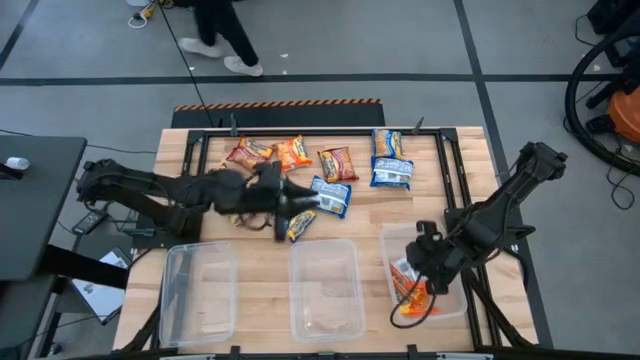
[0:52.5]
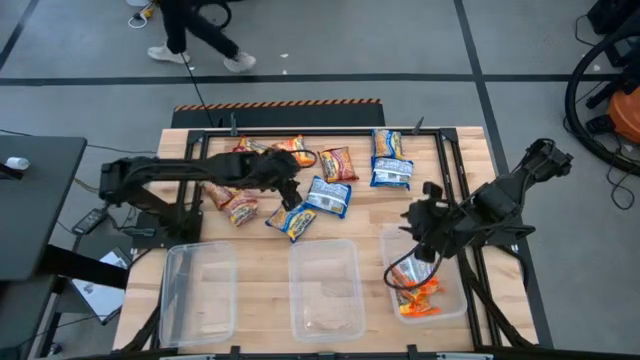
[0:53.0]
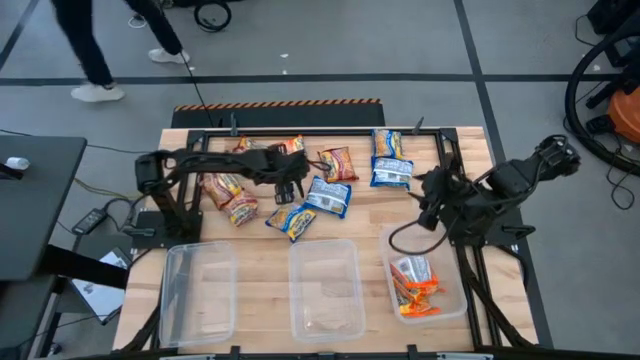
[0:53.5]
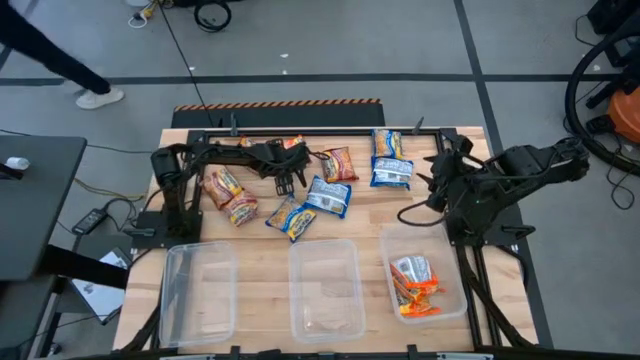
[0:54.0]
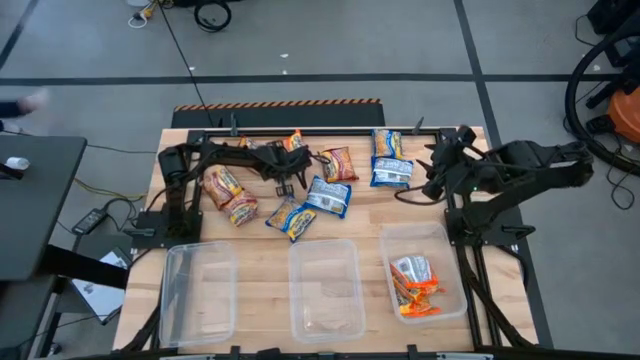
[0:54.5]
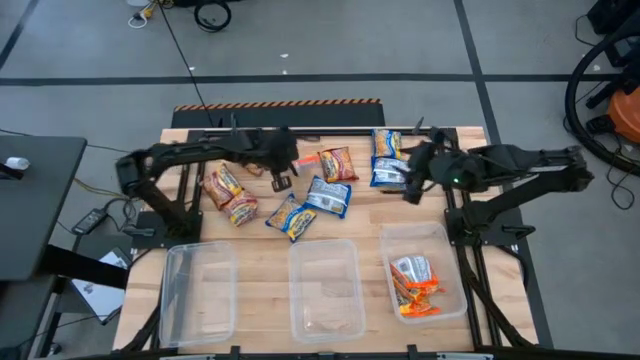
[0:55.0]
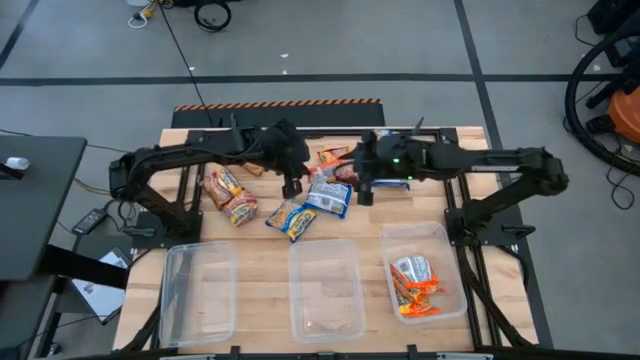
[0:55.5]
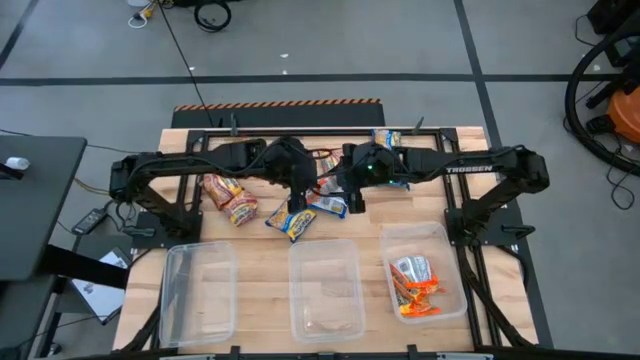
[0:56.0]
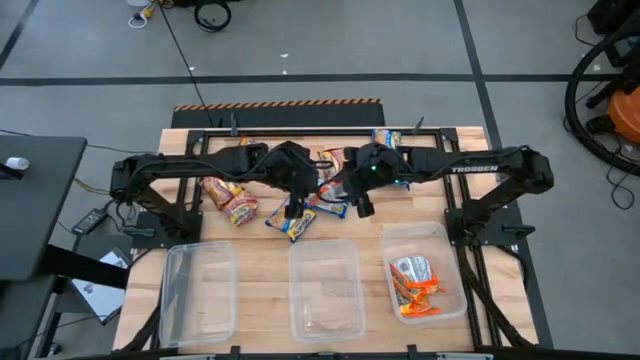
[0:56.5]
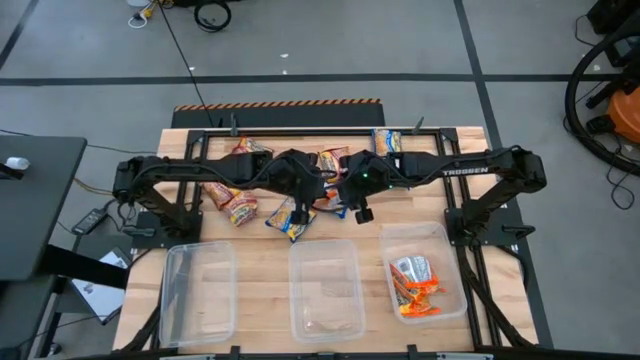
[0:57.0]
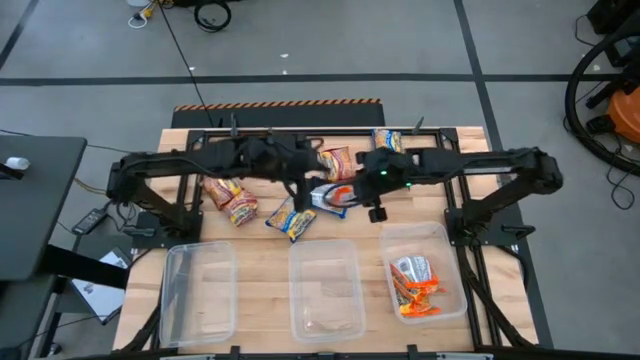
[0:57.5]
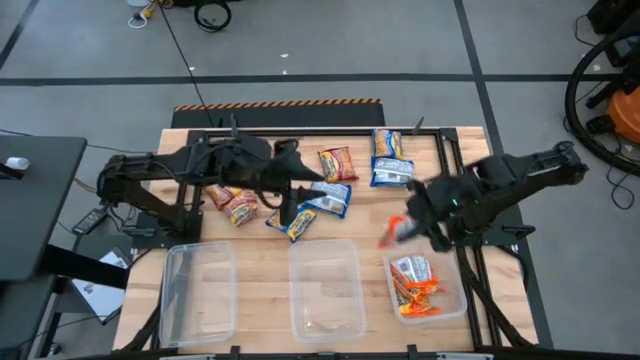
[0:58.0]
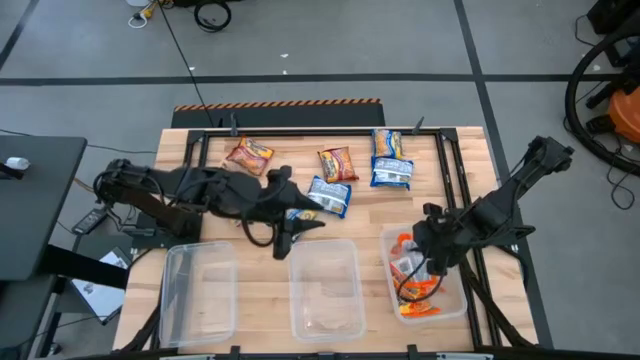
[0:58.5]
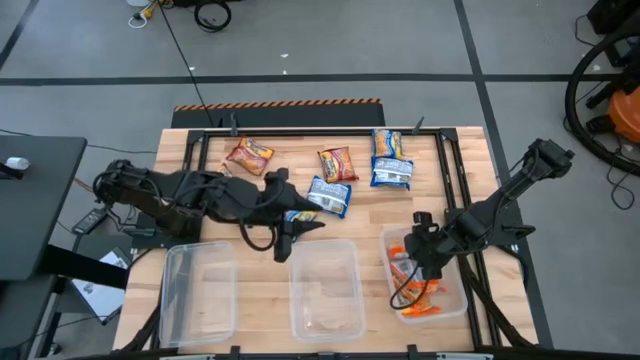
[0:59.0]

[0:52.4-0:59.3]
Task: Sort Maruchan noodles
Put the orange noodle pack on the right transparent bin

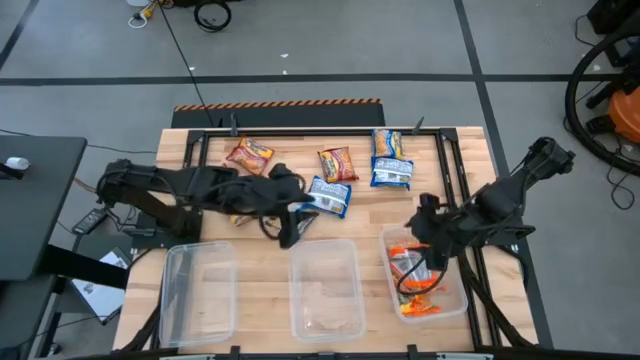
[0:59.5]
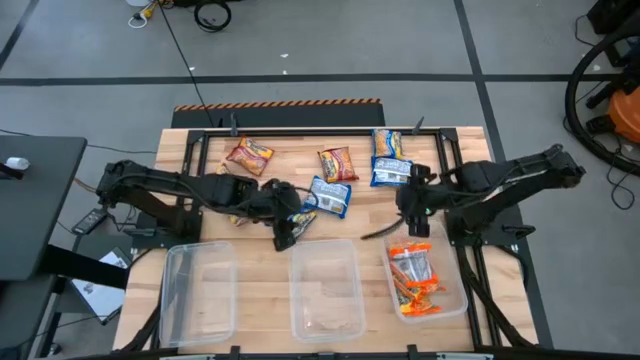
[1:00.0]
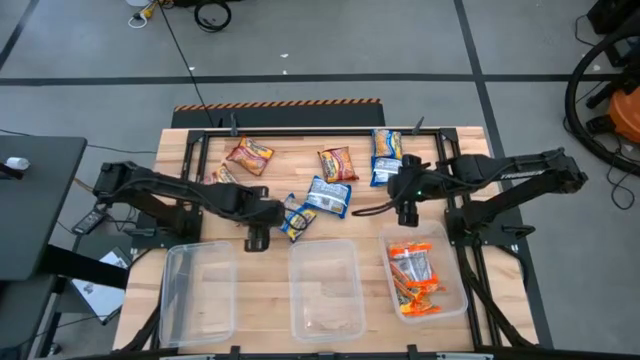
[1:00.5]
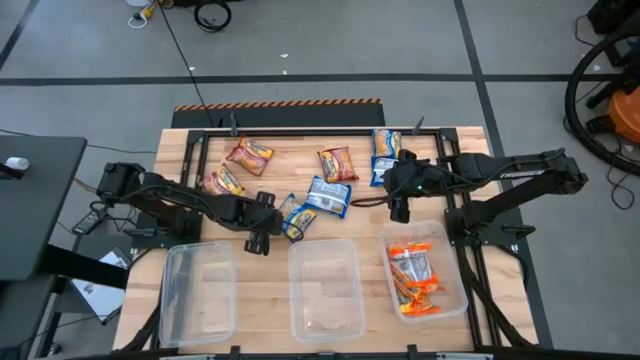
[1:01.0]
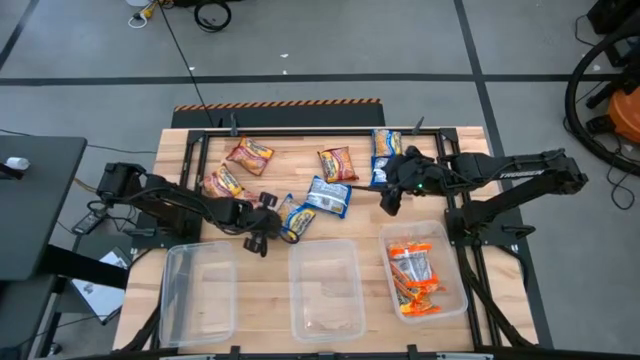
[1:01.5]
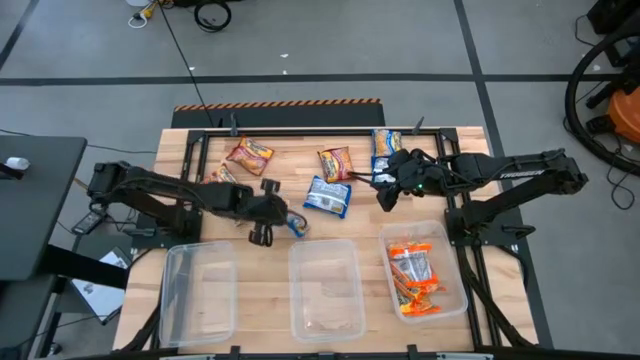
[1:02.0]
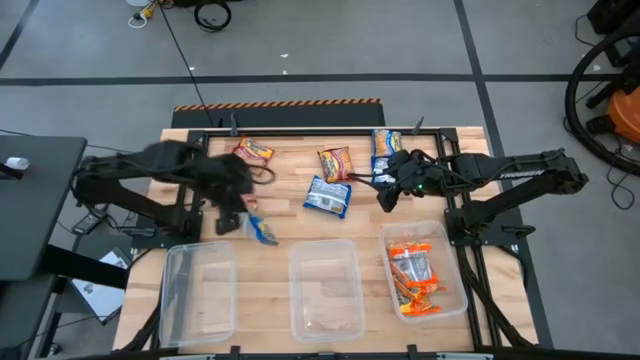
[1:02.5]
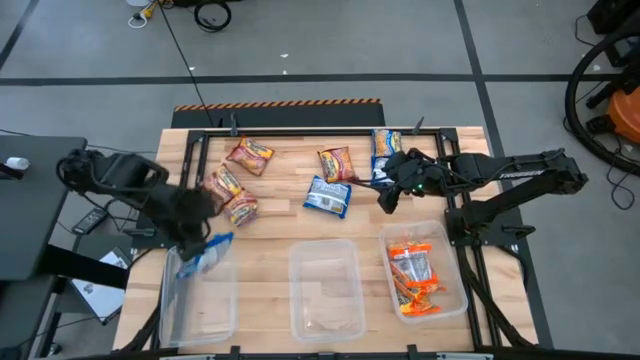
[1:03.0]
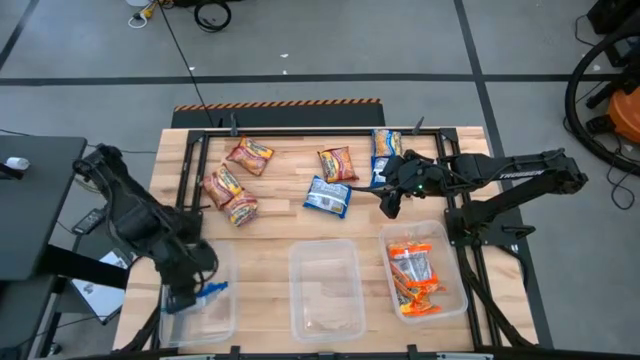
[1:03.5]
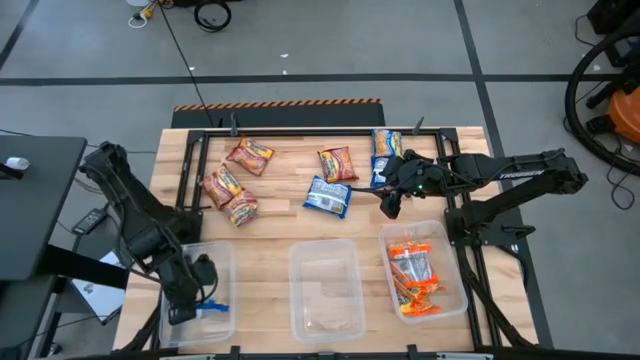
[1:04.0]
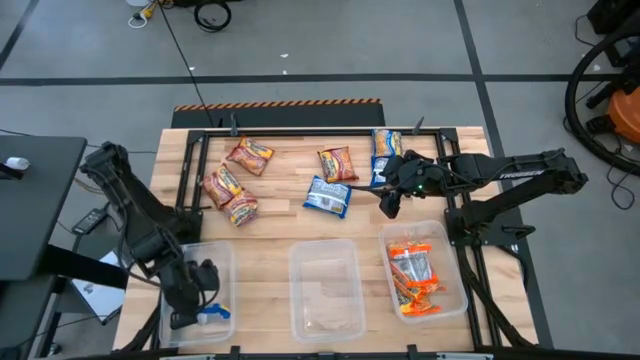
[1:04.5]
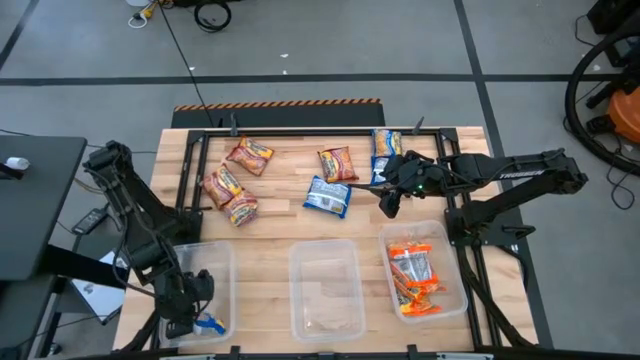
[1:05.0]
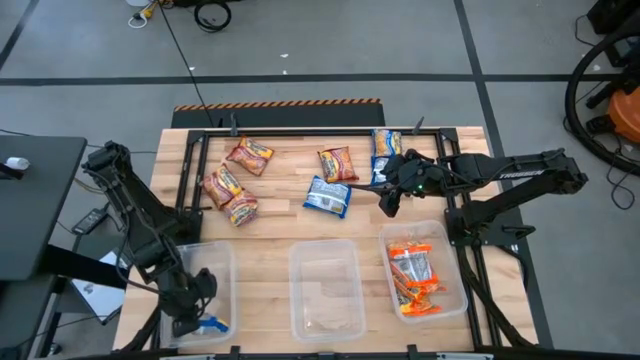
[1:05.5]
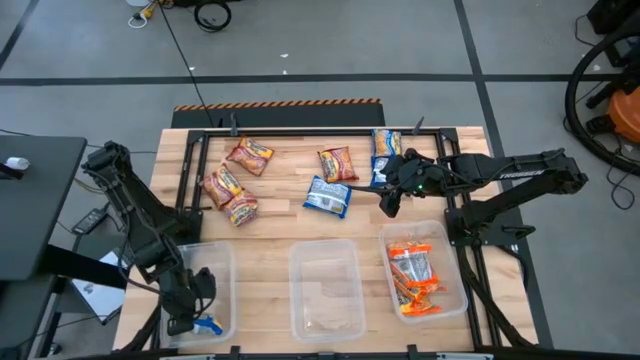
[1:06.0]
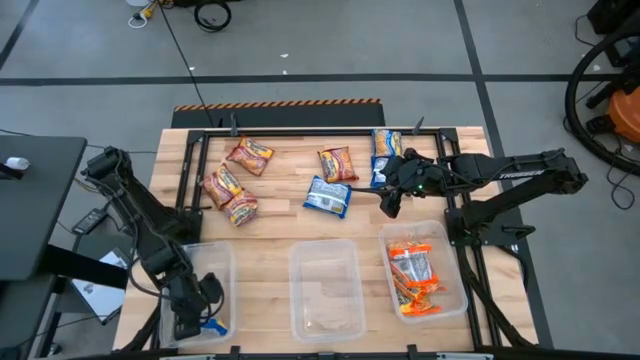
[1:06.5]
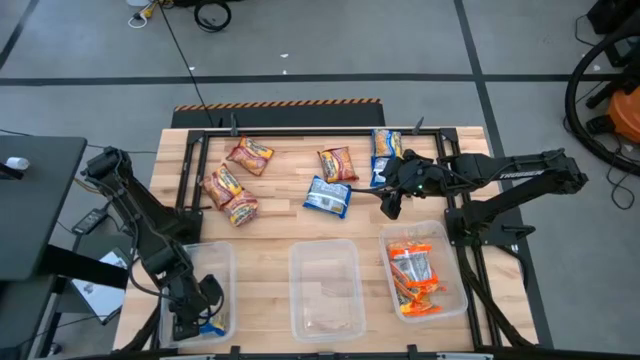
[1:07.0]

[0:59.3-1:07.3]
Put the bottom left blue noodle pack into the left transparent bin

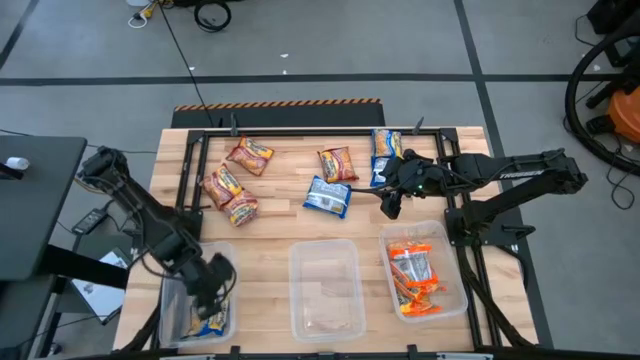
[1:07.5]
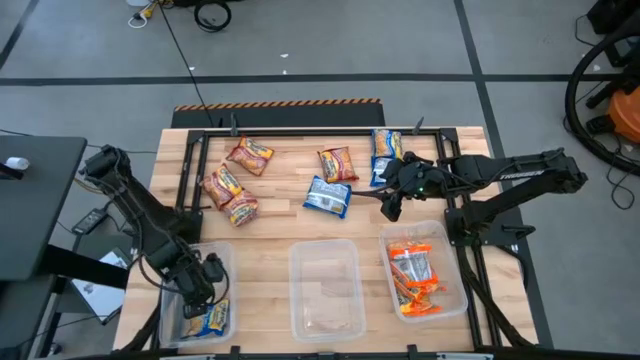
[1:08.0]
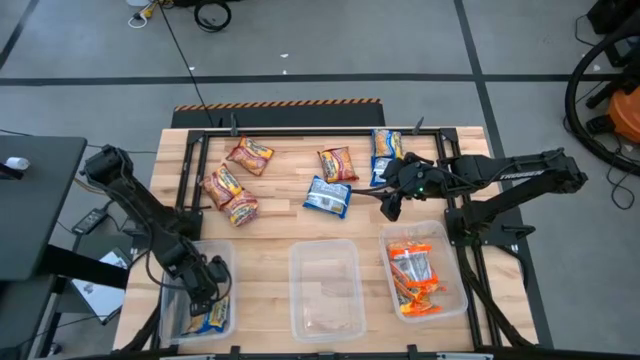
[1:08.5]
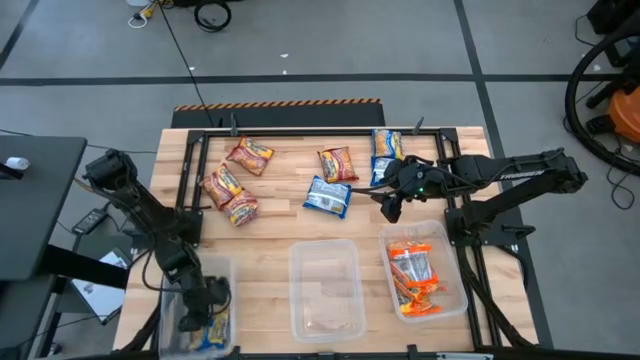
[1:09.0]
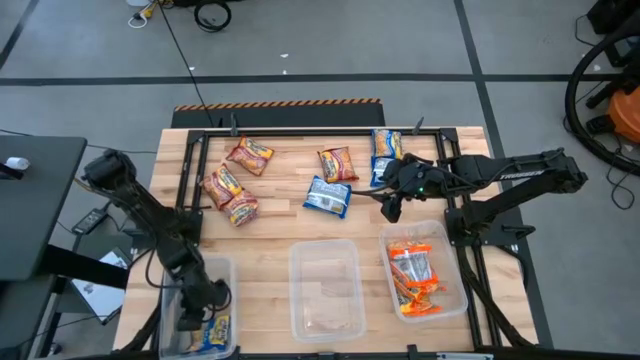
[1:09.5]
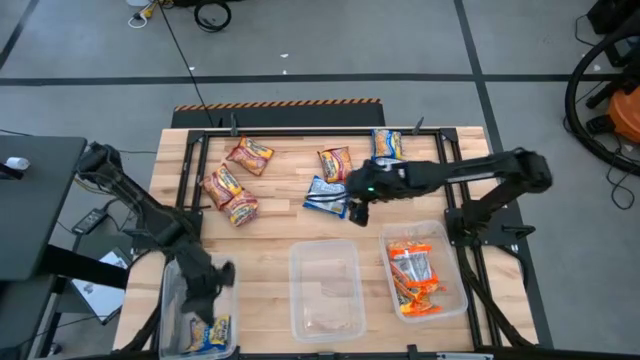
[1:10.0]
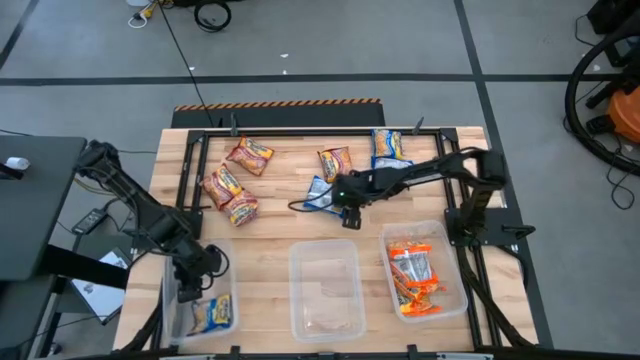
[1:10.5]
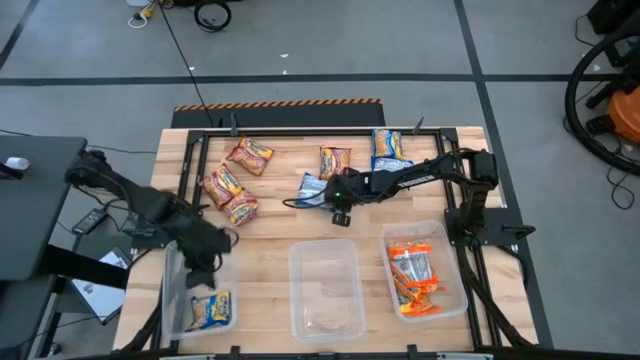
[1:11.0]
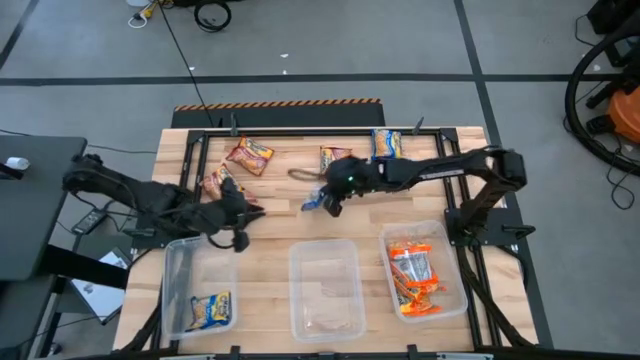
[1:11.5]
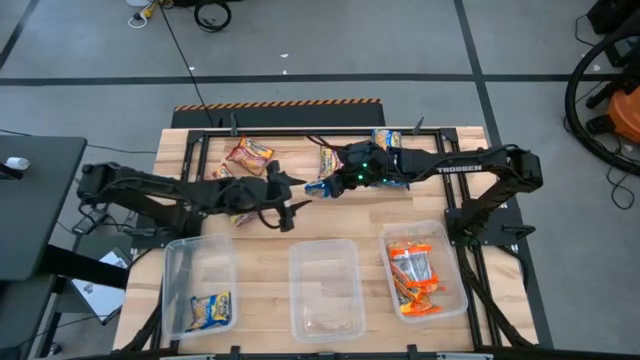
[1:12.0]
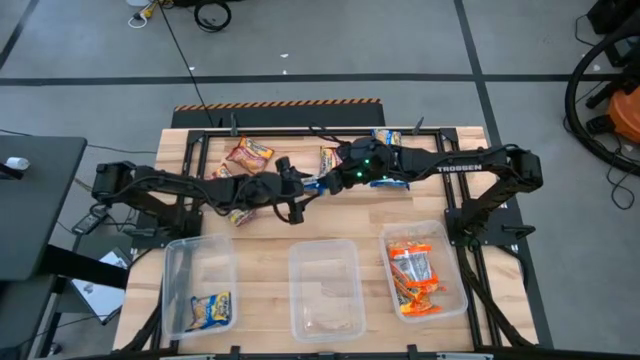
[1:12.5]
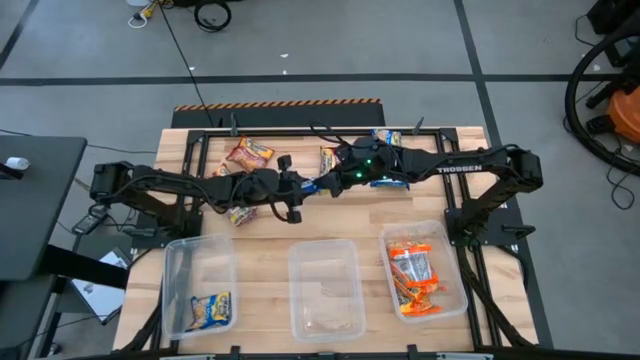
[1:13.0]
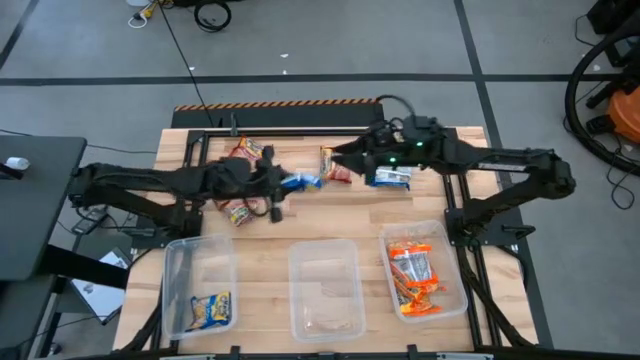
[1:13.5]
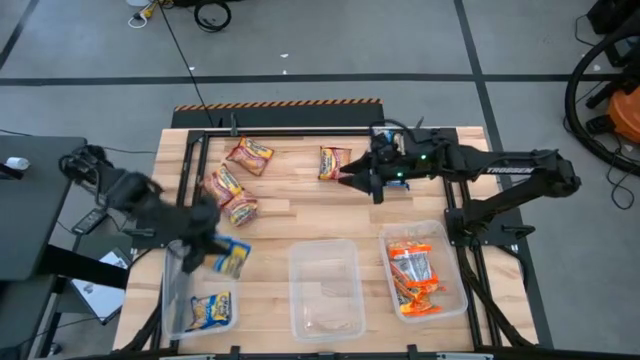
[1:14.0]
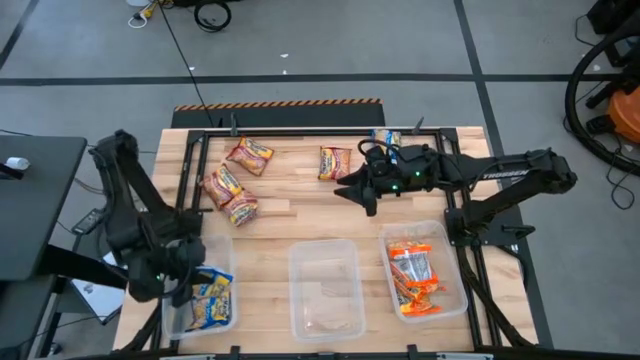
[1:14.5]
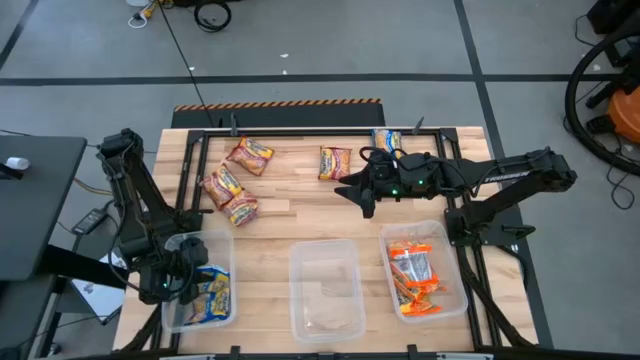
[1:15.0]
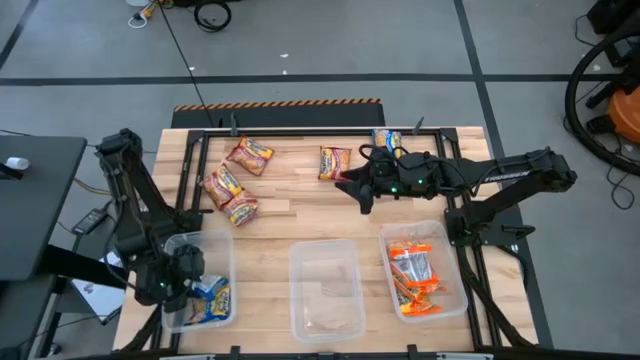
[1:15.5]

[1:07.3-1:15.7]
Put the middle left blue noodle pack into the left transparent bin
